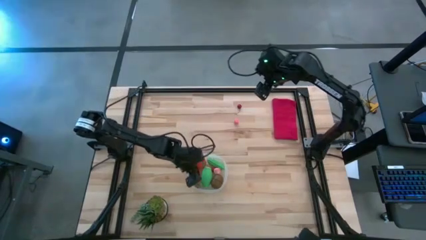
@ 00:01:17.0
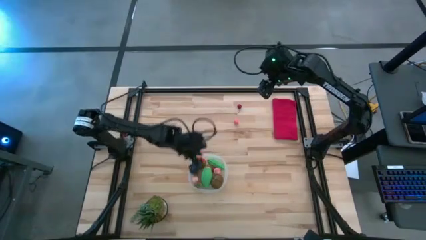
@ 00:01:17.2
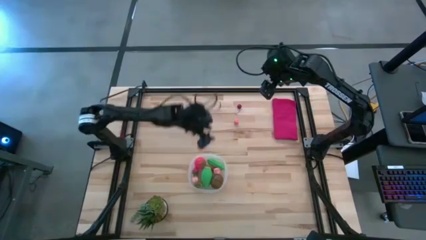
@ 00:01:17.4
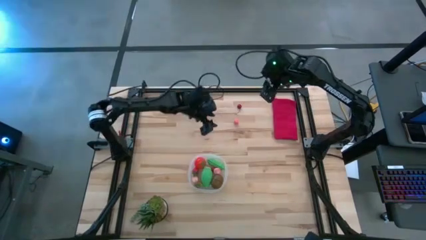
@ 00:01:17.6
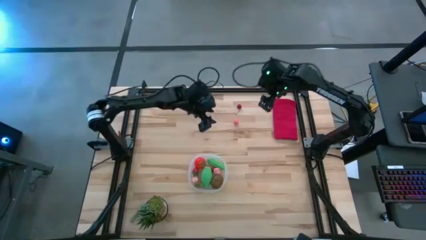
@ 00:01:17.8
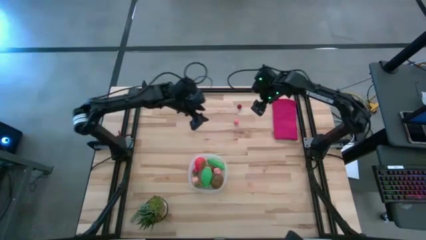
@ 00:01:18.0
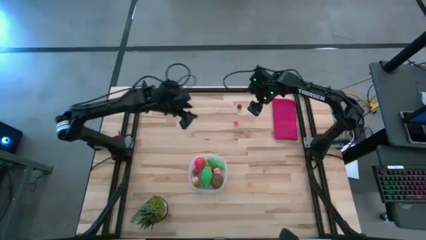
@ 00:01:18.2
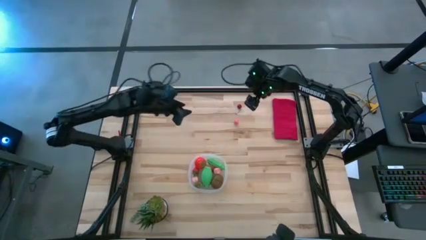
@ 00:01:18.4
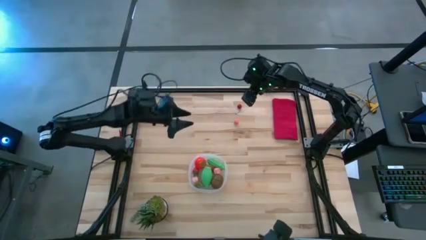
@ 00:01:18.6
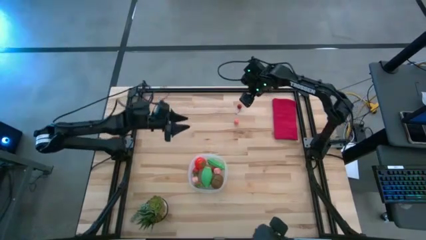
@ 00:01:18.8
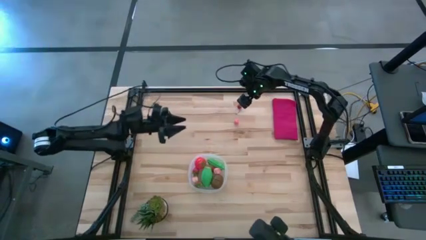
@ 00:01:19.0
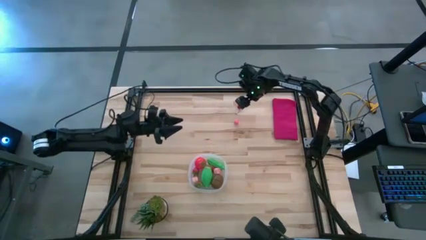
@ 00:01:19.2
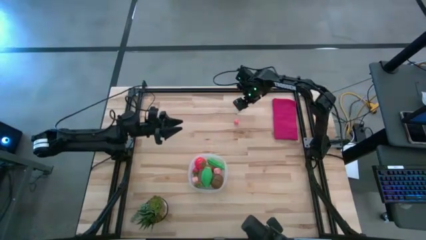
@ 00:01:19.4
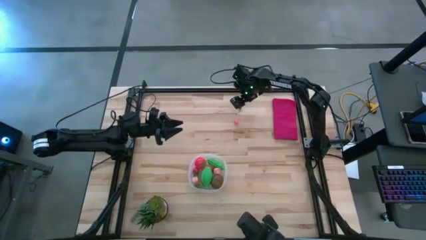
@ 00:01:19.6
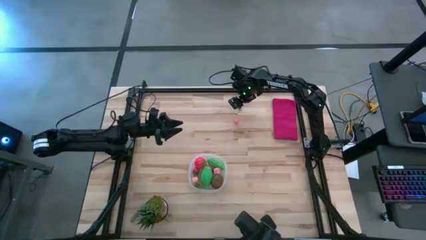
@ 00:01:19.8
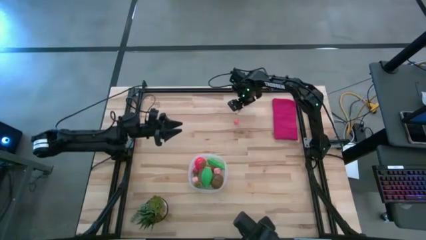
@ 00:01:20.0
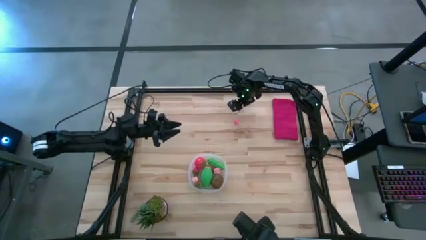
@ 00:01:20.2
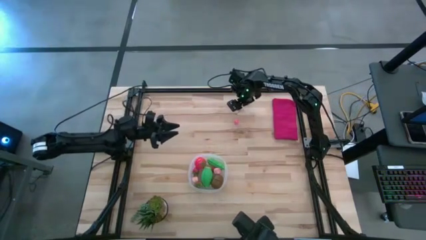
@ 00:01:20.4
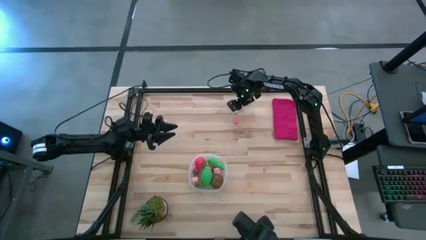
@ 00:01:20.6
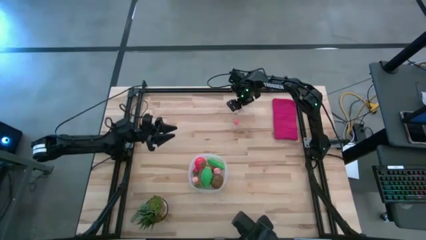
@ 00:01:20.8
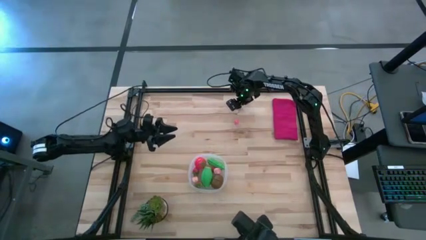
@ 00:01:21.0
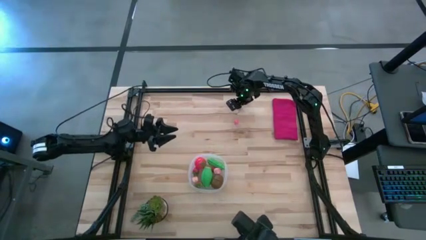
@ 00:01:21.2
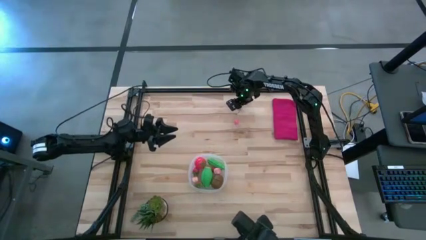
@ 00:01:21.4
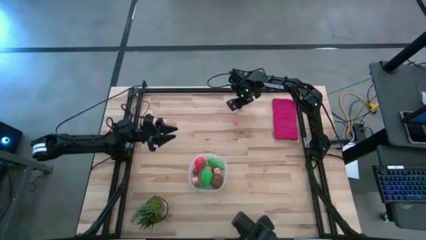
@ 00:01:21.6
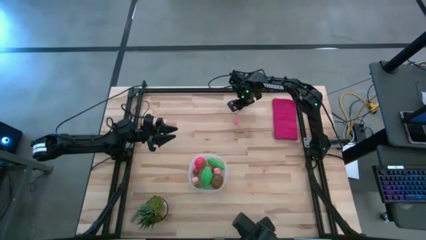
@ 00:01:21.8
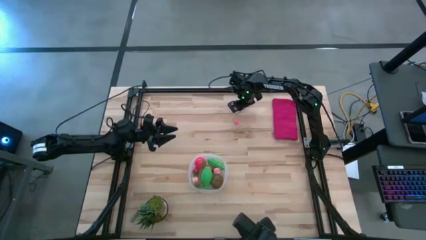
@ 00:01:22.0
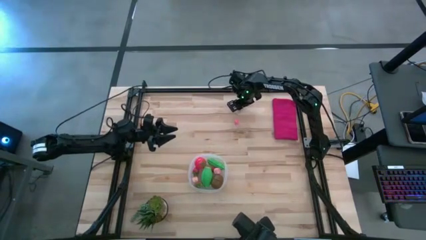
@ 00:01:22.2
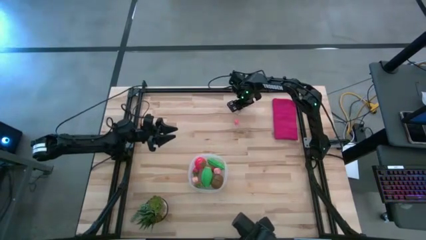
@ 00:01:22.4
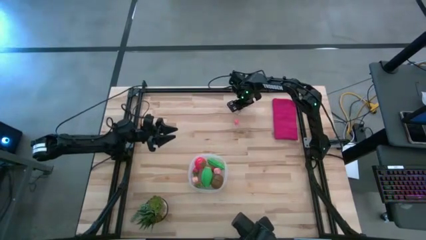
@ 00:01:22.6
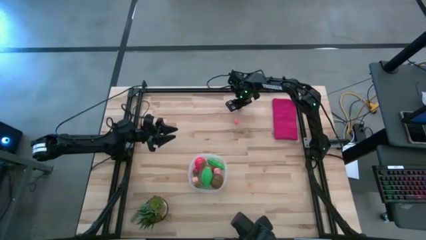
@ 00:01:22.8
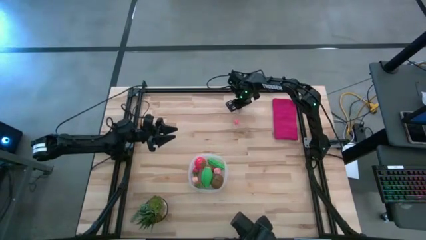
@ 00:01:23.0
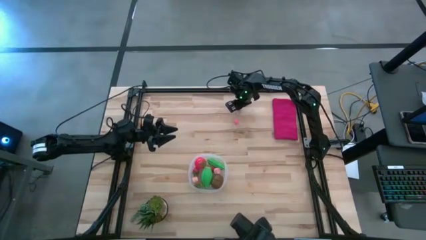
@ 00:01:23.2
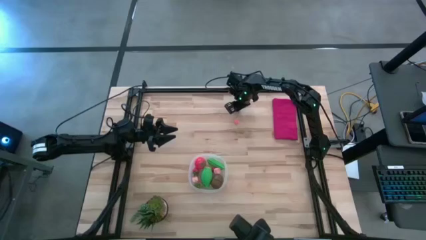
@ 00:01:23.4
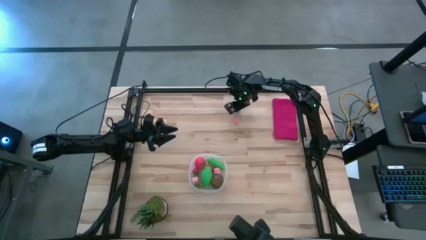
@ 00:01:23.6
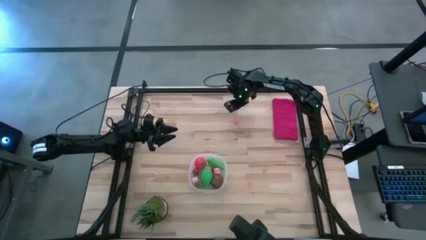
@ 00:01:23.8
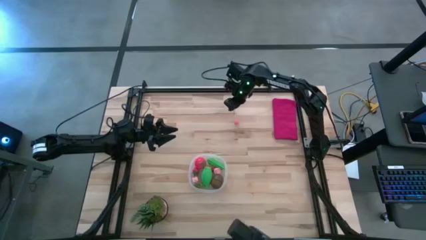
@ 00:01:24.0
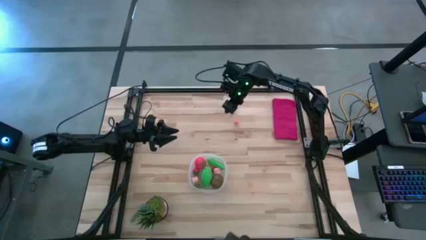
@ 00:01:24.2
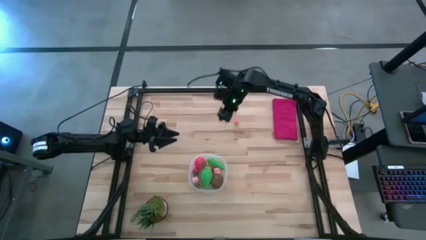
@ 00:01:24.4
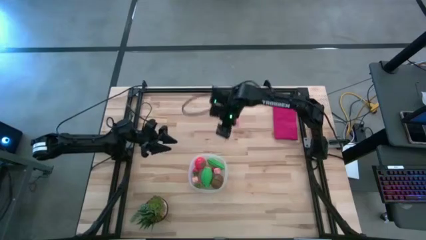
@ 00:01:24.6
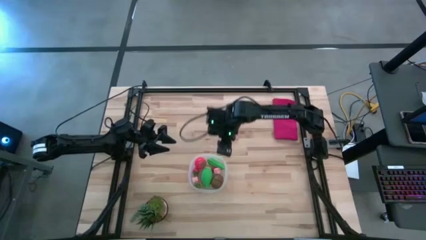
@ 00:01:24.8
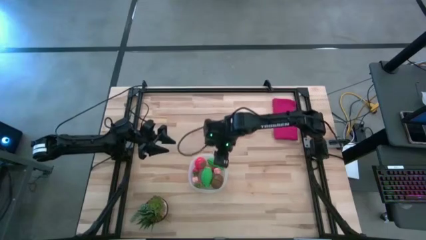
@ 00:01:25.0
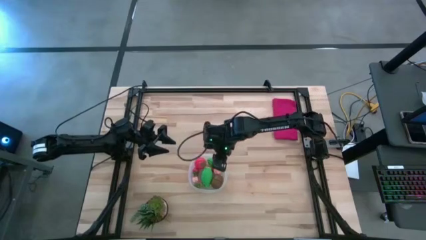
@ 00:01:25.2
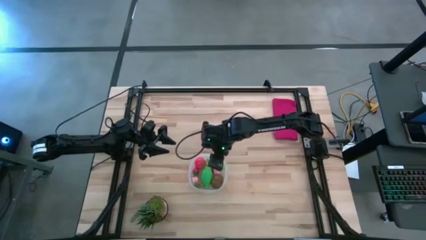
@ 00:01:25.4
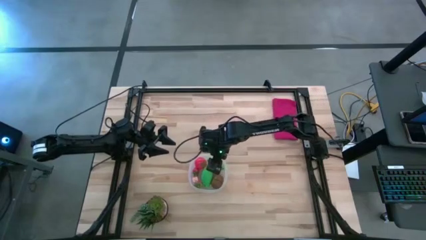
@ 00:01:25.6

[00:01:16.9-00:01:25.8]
Task: Pick and placing Produce into tupperware
Put the red cherry into the bin

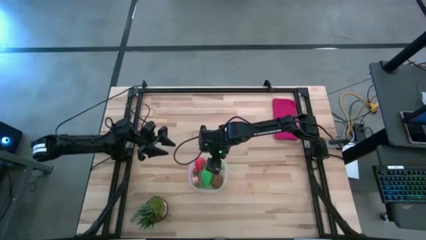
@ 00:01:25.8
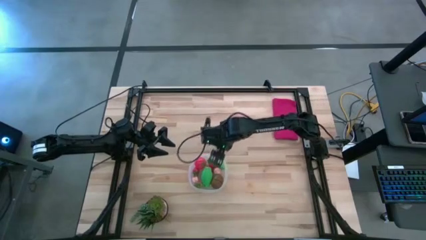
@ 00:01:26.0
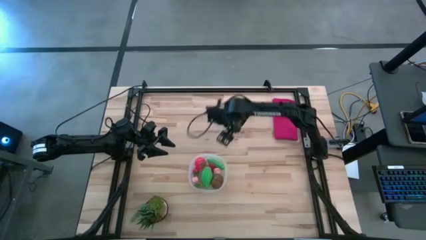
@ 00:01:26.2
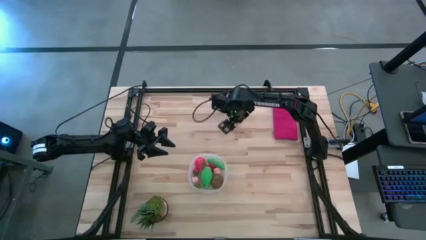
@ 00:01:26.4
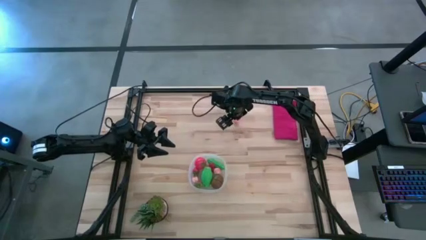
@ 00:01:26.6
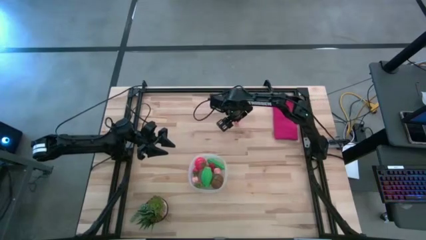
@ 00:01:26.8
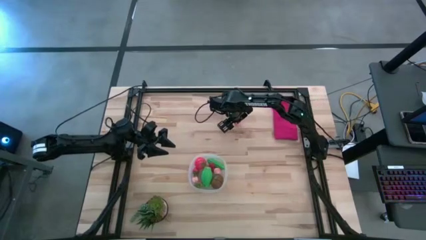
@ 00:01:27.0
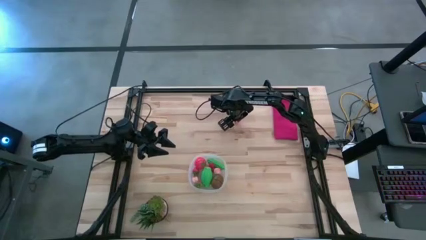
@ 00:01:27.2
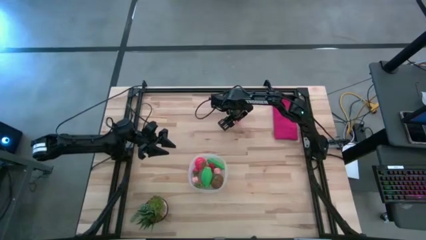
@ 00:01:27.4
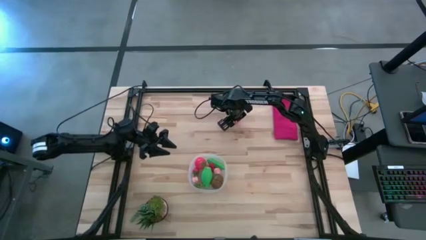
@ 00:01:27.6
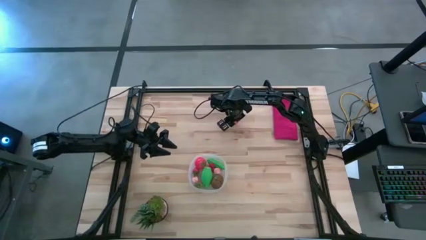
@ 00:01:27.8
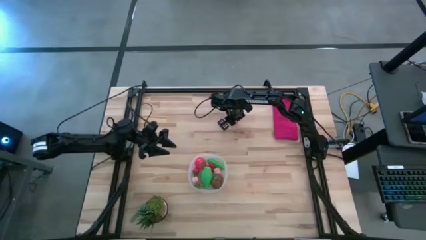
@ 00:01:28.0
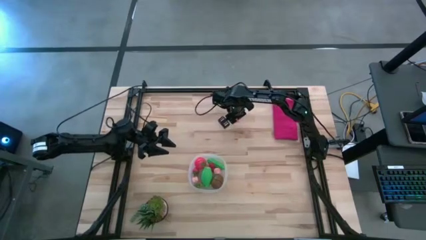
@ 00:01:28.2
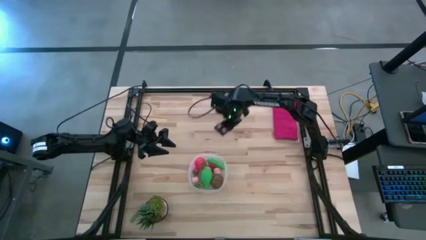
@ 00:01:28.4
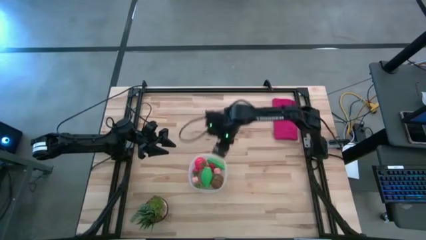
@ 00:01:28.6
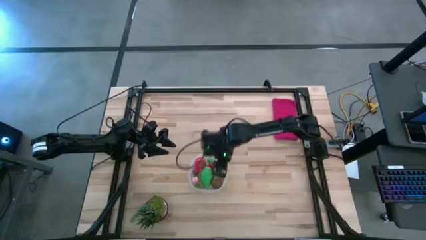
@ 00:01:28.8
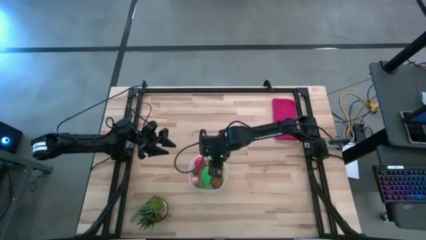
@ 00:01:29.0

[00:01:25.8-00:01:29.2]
Put the peach into the bin

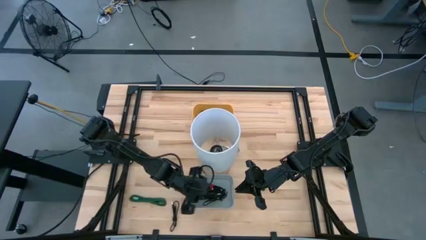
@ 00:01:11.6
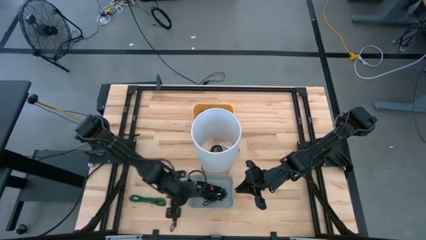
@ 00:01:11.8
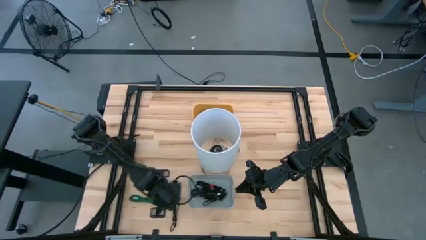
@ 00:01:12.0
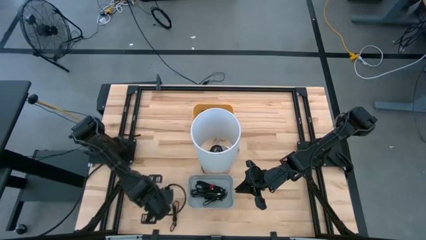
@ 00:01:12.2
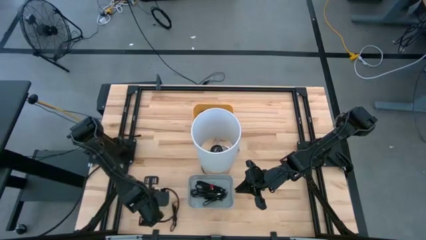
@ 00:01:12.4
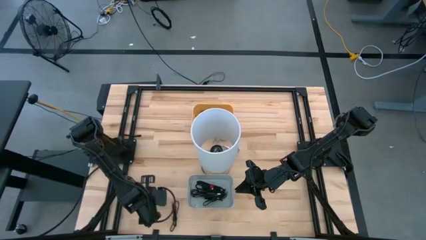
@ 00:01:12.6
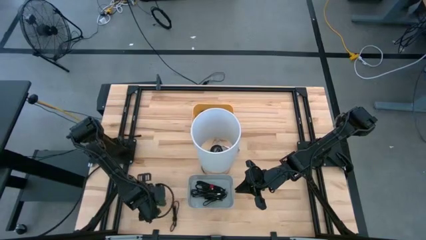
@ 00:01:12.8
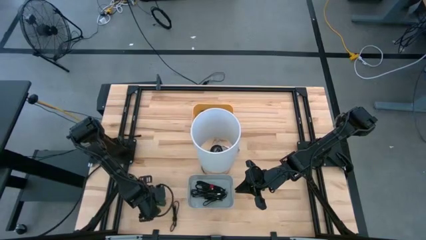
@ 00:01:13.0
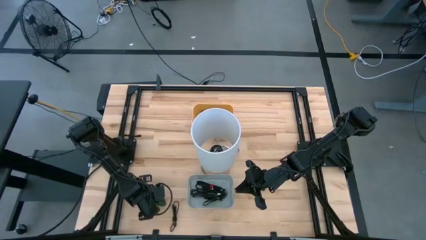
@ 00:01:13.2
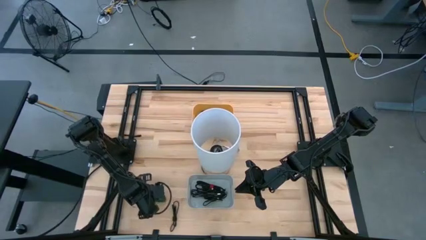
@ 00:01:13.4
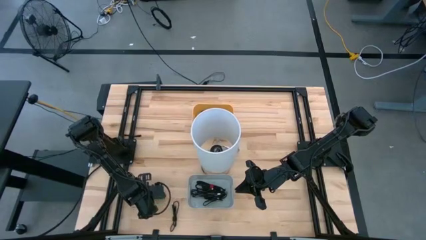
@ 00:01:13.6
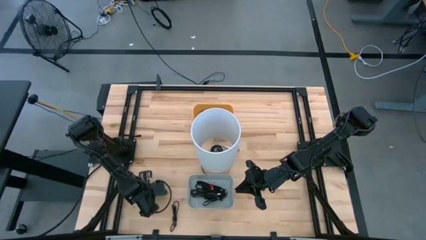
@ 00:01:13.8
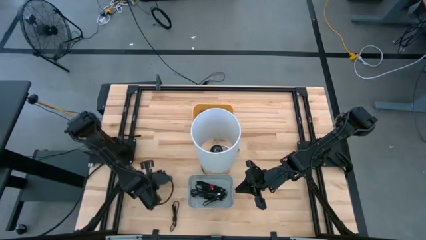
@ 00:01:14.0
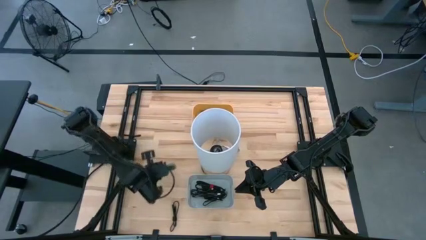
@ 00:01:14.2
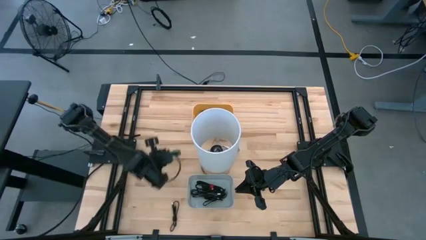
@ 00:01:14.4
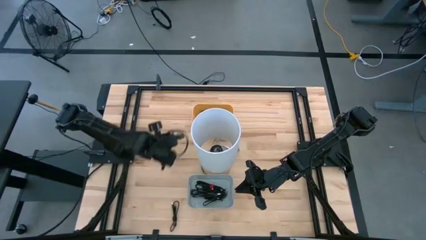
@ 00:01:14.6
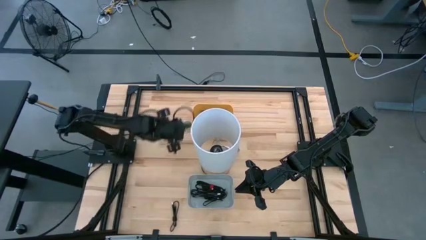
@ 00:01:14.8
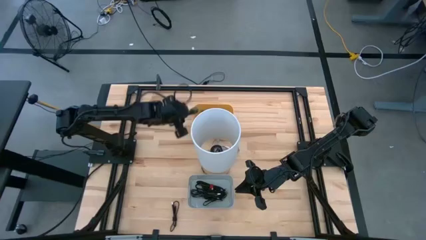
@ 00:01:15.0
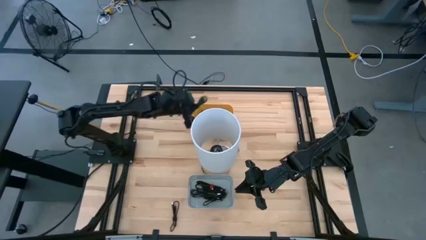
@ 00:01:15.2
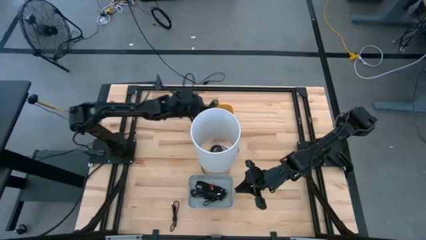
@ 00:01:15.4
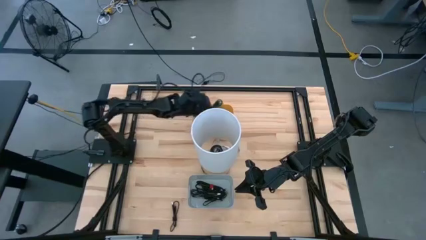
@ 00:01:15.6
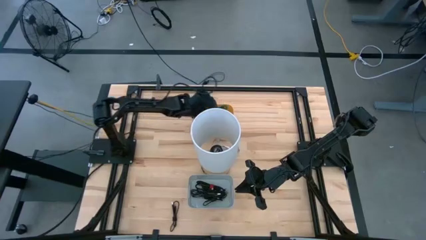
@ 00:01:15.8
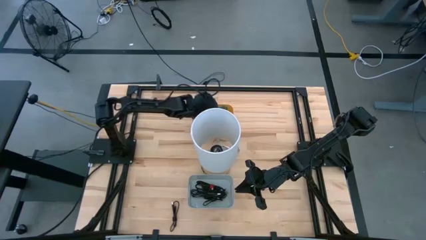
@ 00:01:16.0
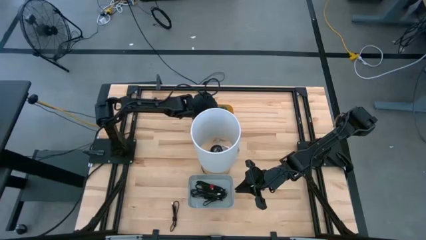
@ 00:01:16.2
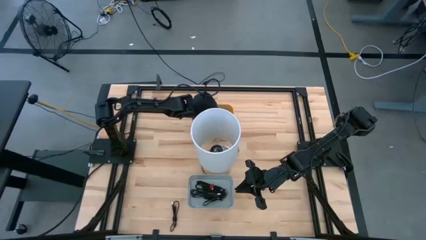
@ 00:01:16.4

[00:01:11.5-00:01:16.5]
Task: Pick & Place USB Port
Put the green charger cable into the yellow bin
